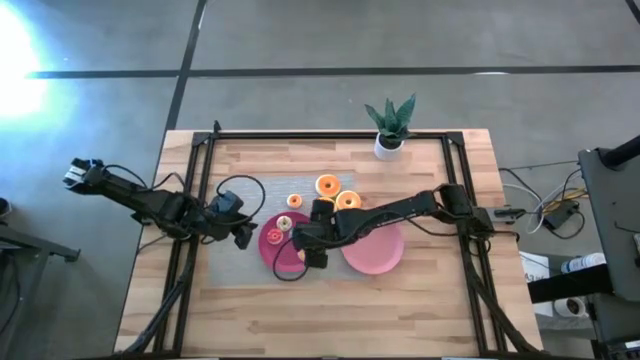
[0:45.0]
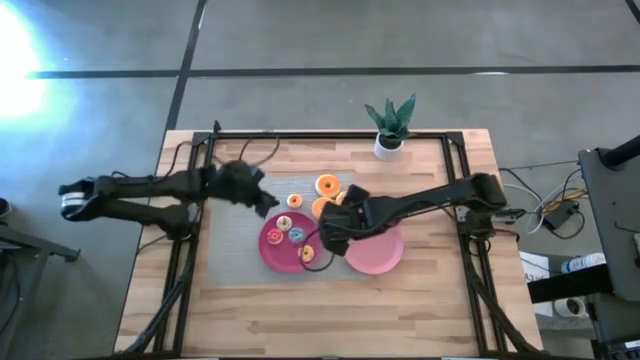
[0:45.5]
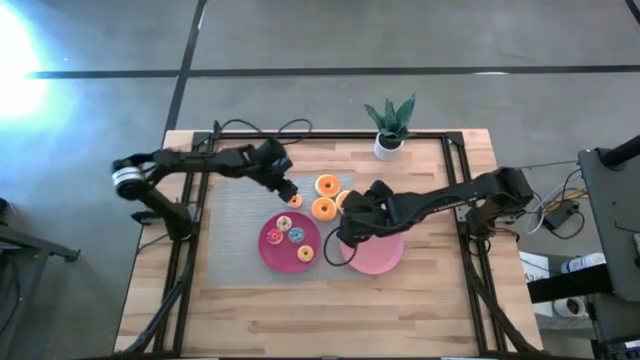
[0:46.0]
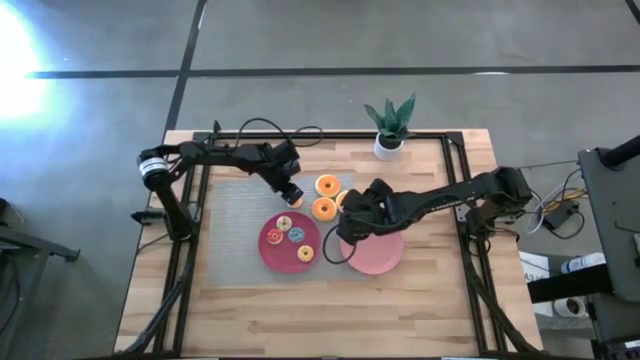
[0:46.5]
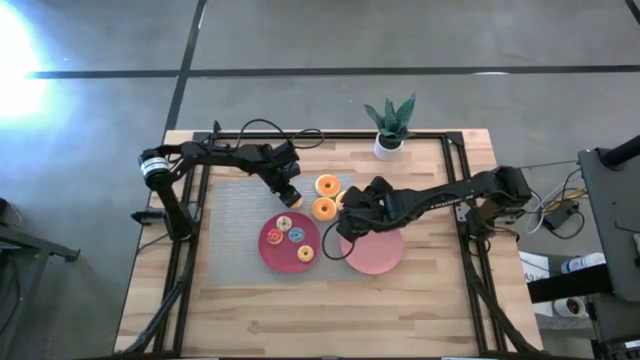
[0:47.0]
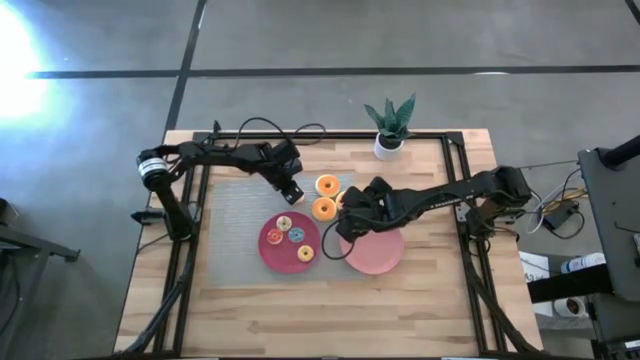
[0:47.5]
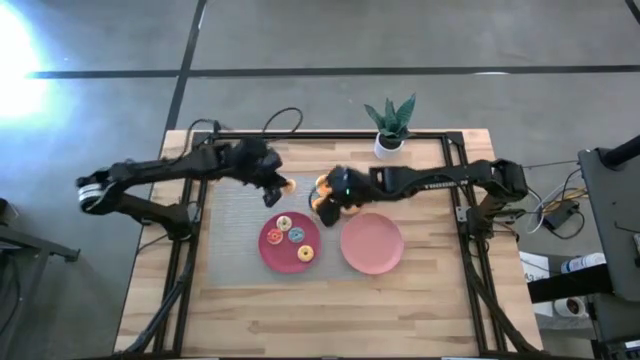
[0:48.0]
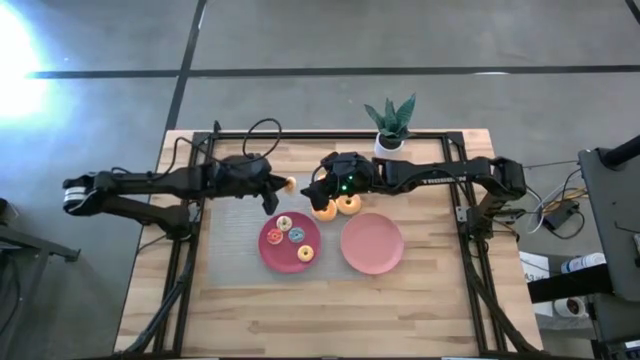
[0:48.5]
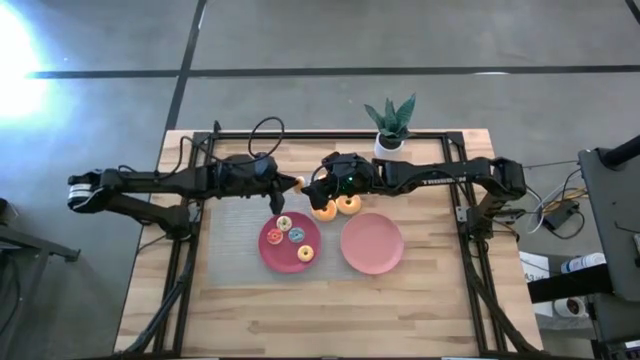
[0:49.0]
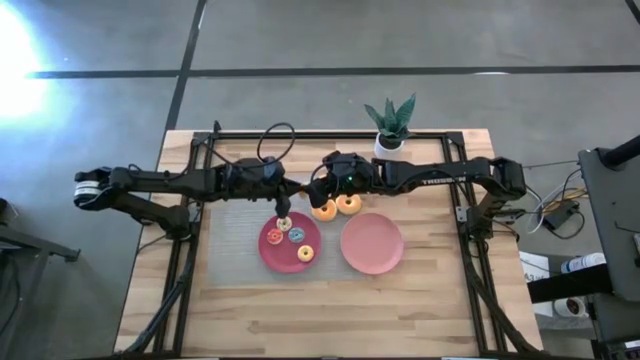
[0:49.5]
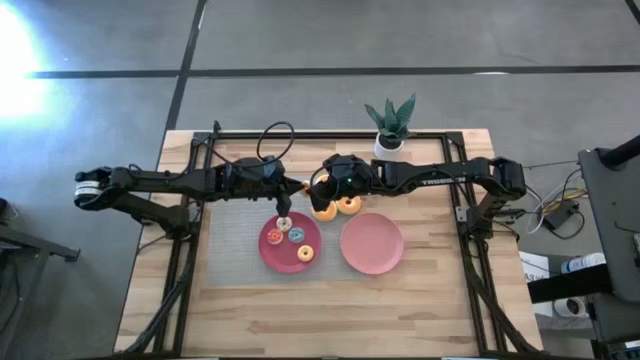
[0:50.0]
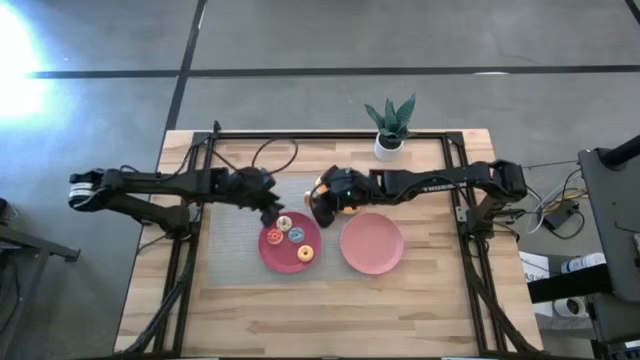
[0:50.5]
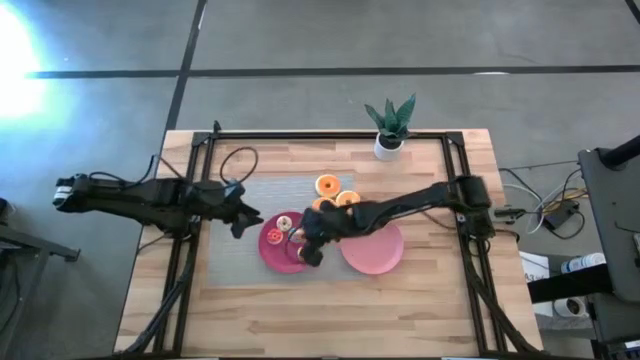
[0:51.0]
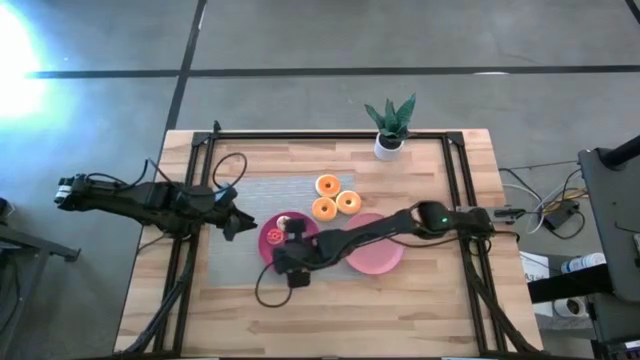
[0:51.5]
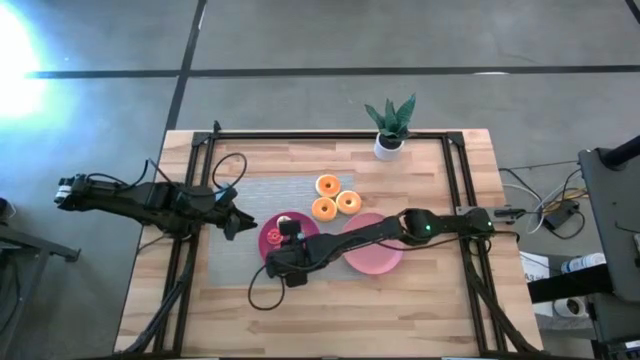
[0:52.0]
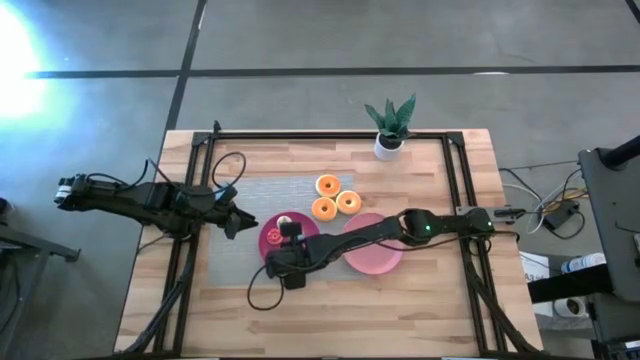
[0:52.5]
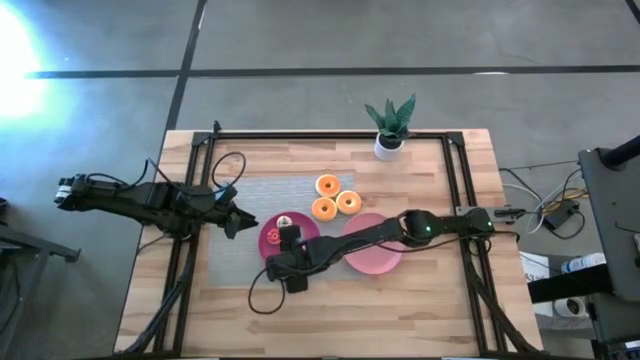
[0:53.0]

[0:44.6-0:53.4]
Task: Pick & Place donuts
Put the small pink donut on the dark pink plate

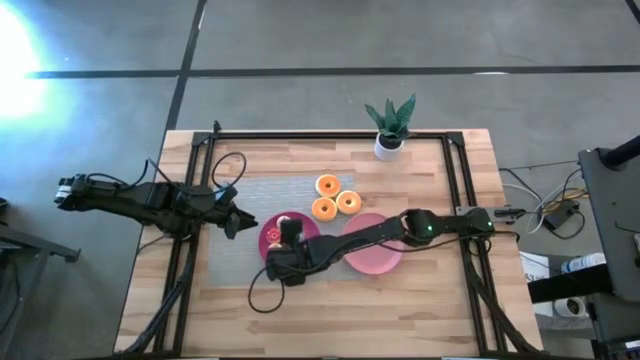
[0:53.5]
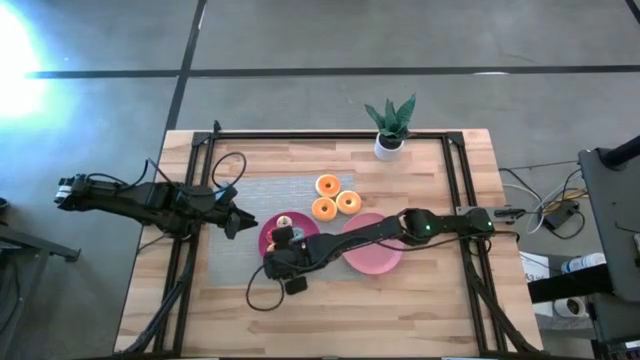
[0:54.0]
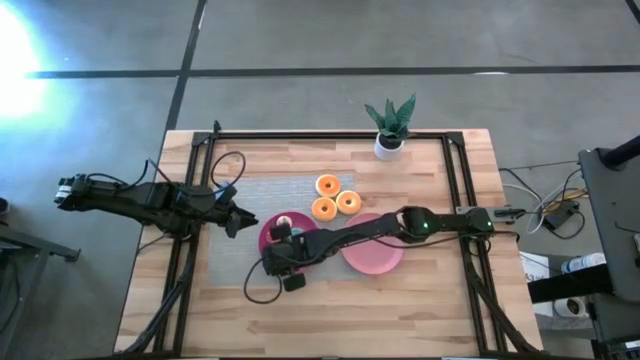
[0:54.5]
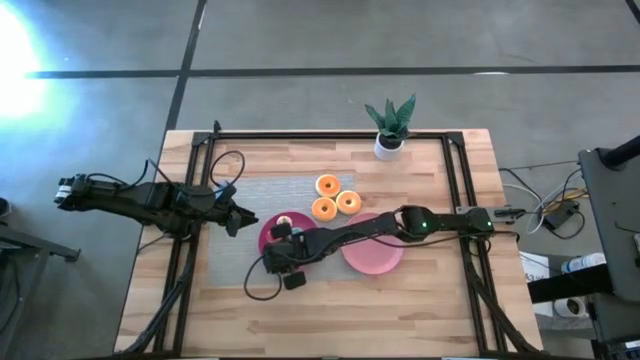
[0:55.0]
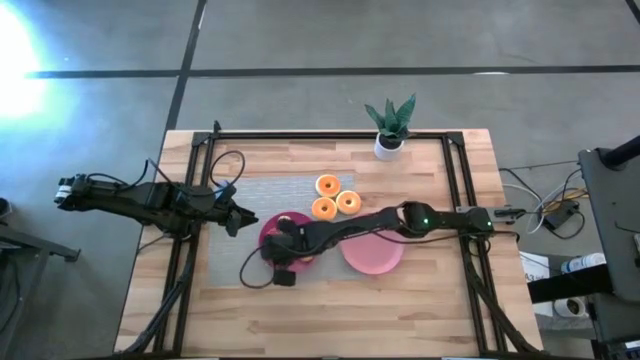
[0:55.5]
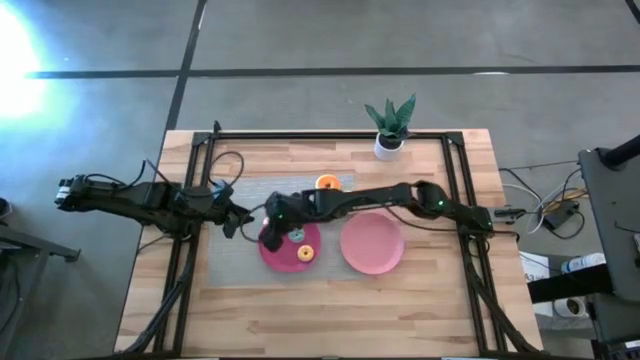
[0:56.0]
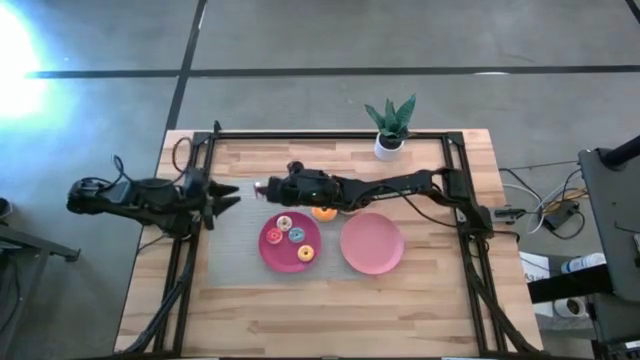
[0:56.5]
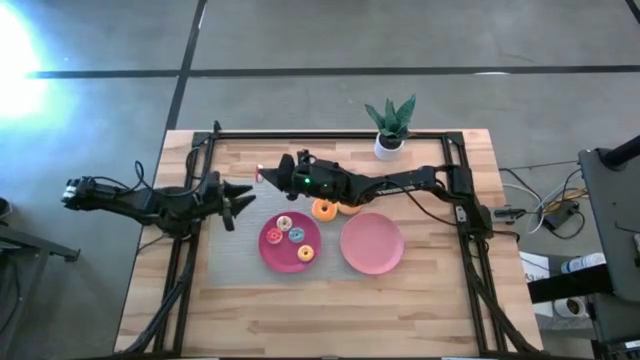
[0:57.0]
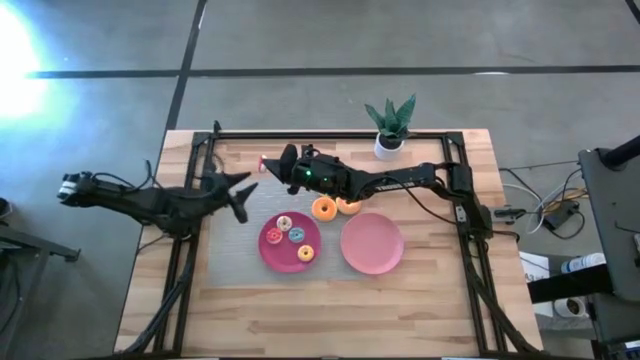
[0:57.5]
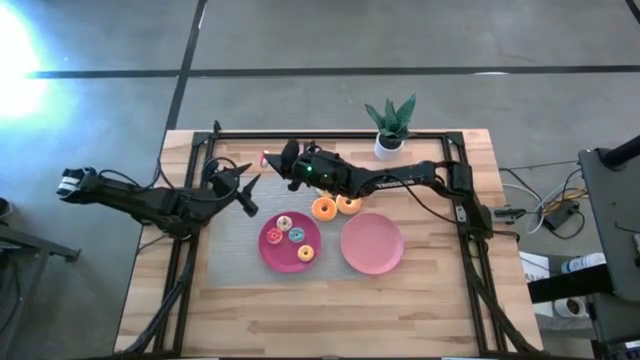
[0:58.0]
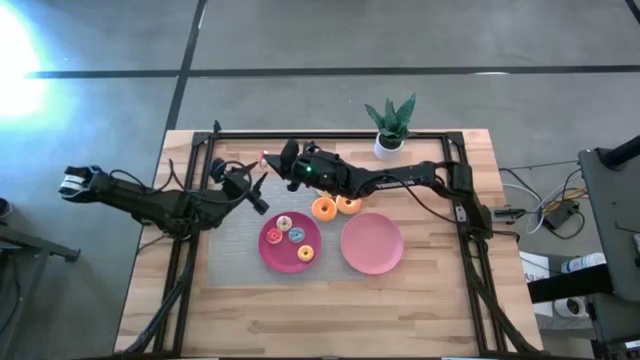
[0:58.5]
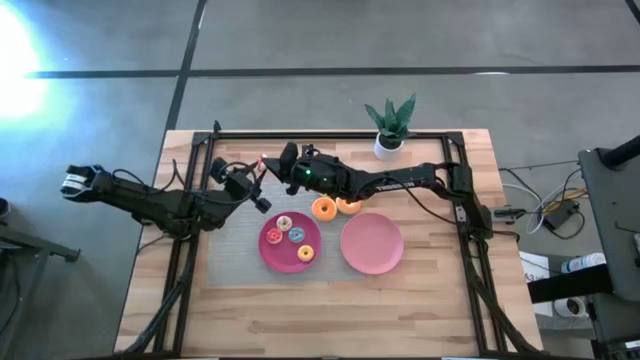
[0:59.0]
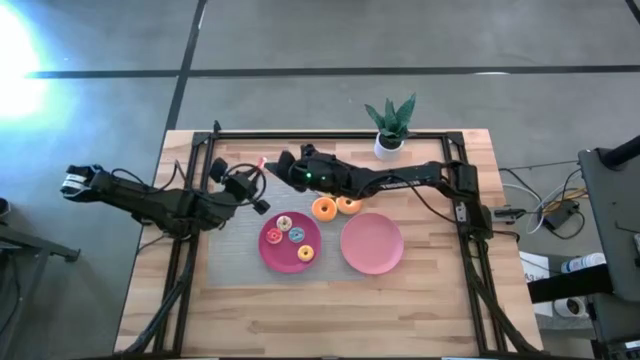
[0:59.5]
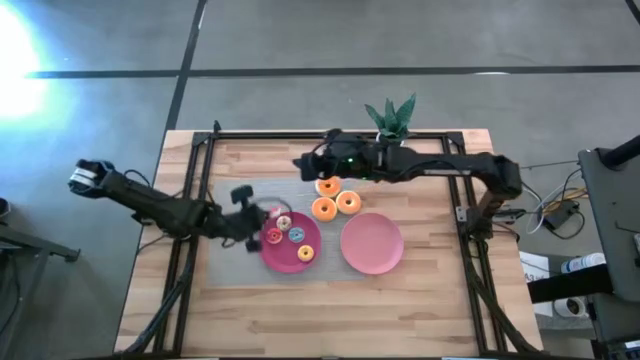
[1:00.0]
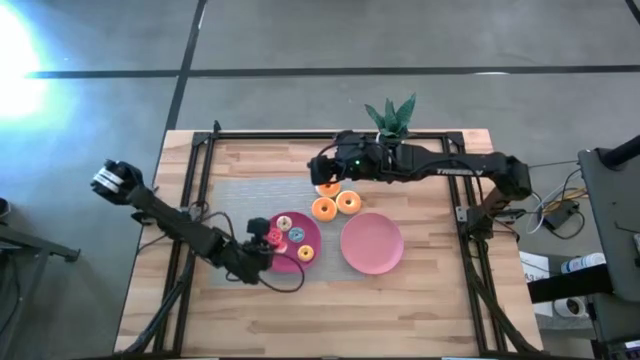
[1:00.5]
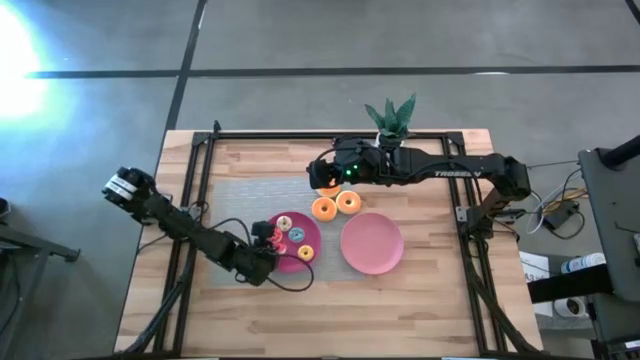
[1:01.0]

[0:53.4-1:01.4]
Put the small pink donut on the dark pink plate

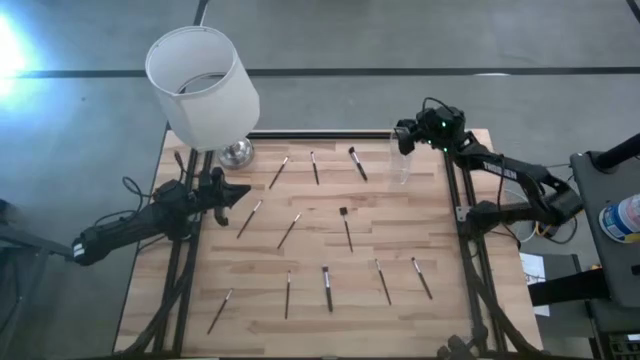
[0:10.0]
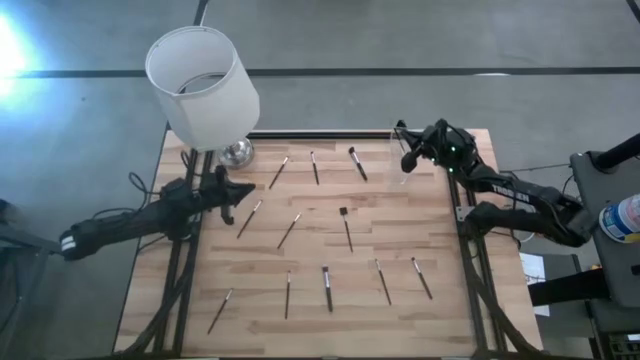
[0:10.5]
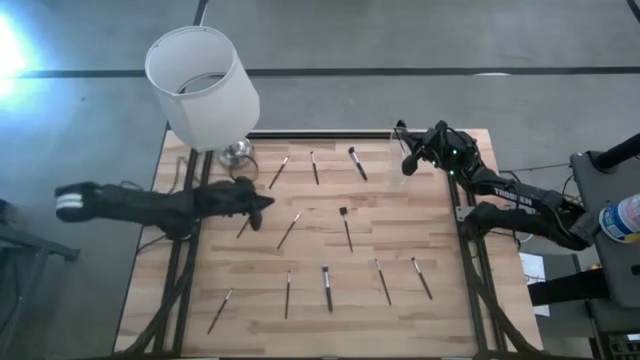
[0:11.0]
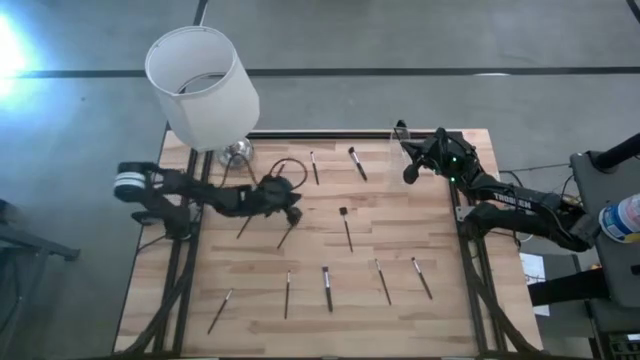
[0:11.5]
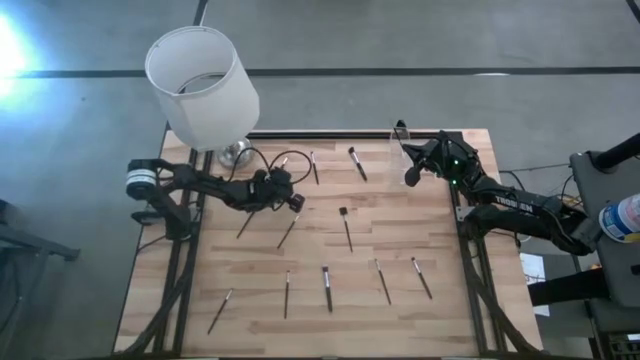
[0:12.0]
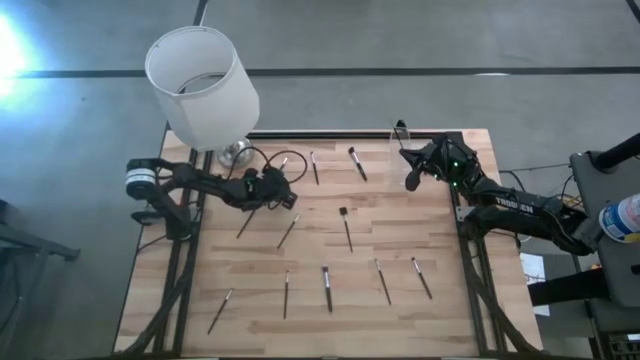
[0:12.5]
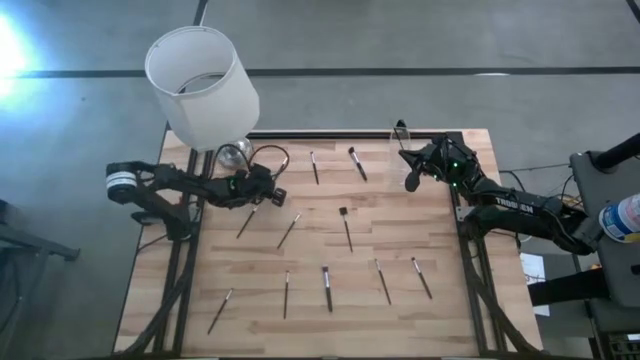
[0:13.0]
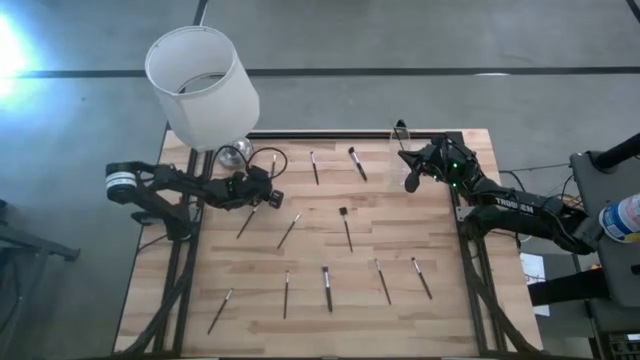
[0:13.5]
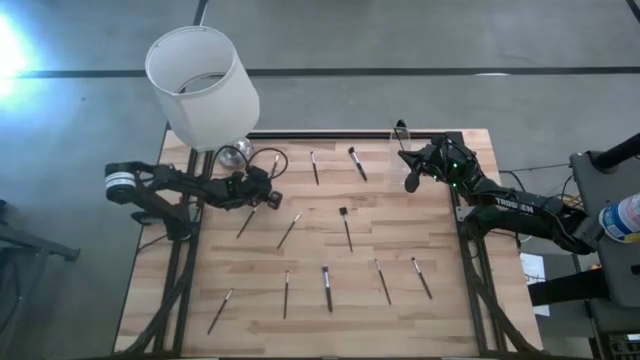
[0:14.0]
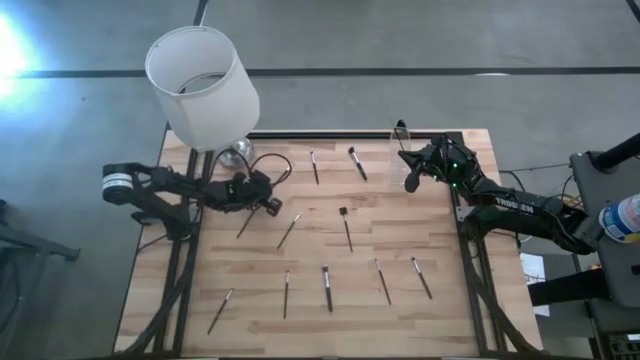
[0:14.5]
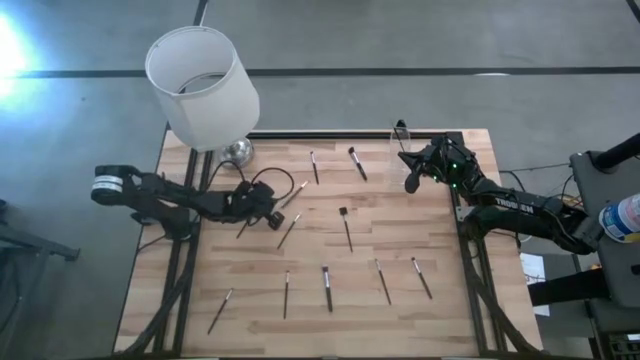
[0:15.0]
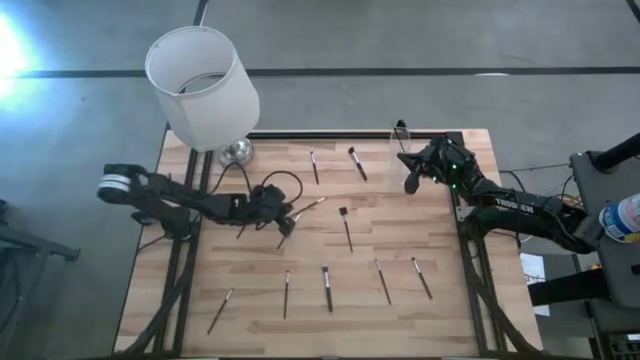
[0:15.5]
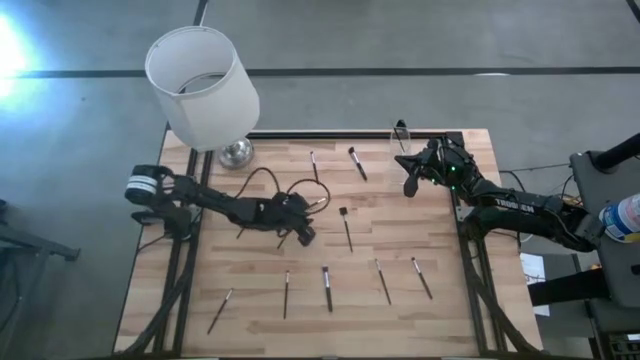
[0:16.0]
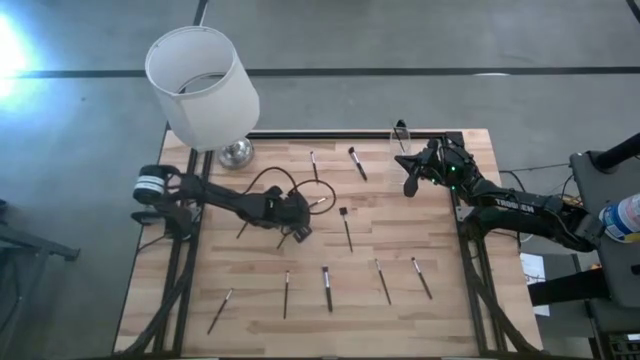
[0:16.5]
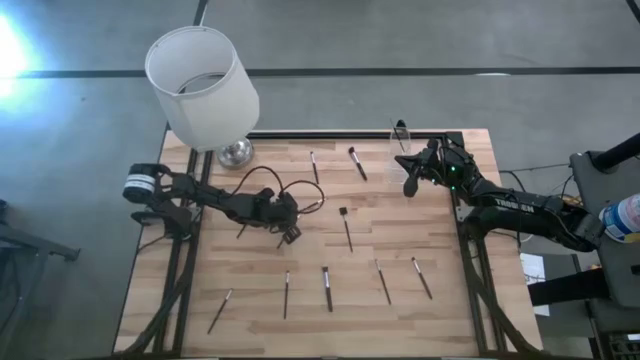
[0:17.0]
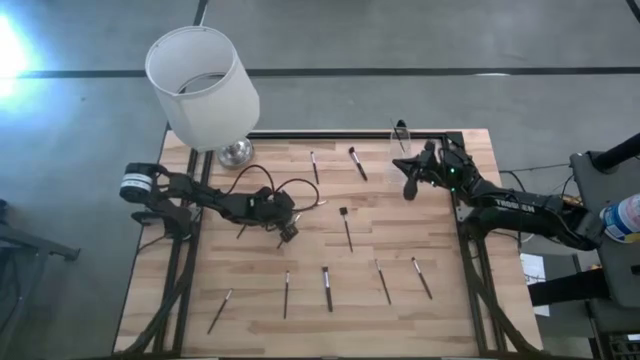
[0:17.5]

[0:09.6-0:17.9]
Task: Put items in baskets/containers
Put the eyeshadow brush into the transparent organizer
